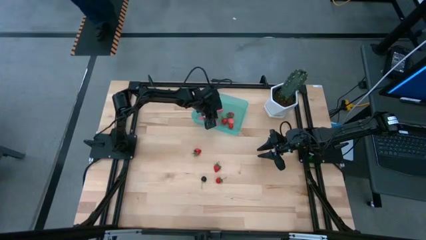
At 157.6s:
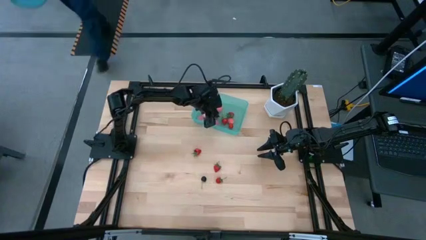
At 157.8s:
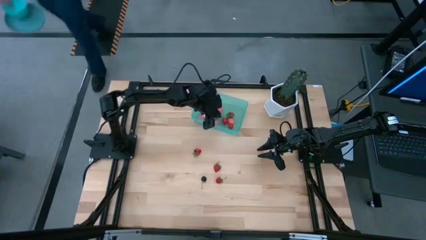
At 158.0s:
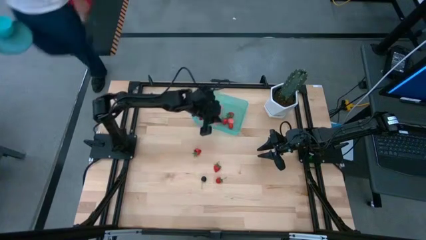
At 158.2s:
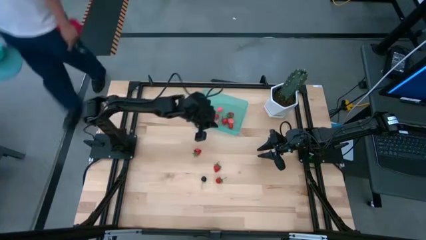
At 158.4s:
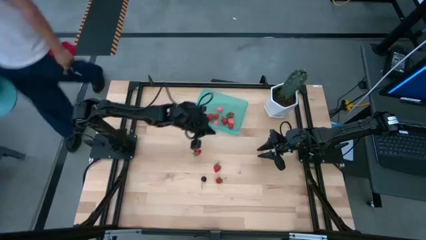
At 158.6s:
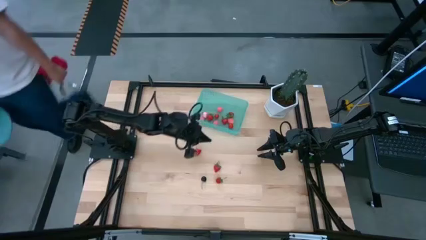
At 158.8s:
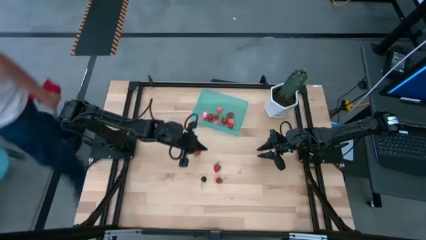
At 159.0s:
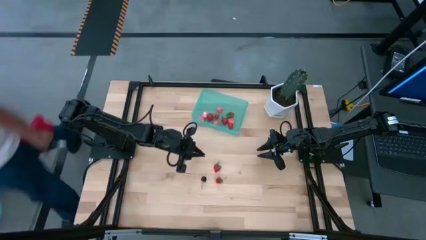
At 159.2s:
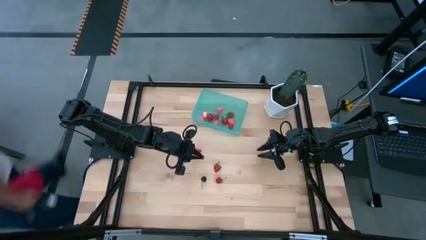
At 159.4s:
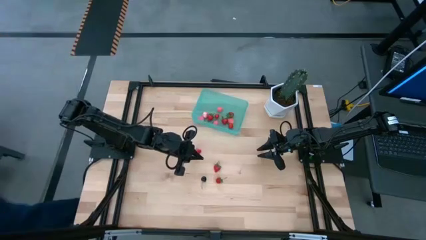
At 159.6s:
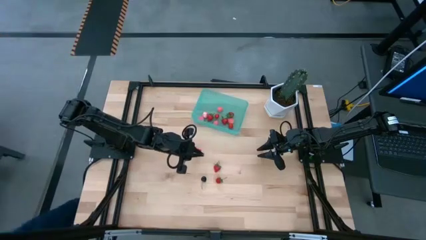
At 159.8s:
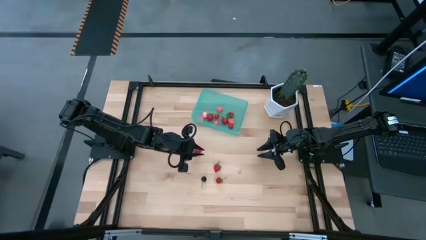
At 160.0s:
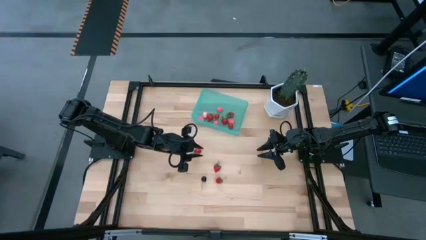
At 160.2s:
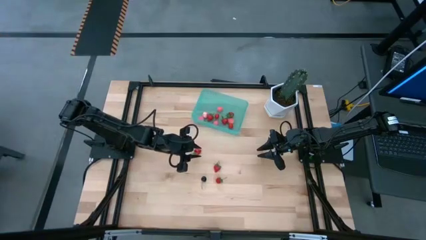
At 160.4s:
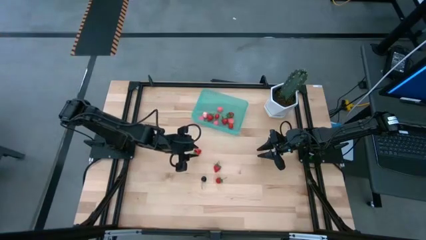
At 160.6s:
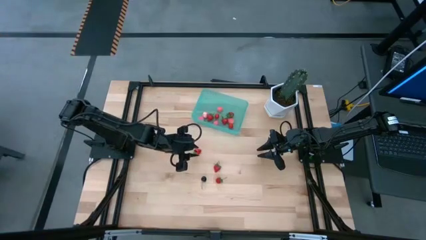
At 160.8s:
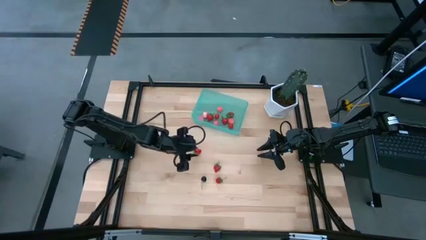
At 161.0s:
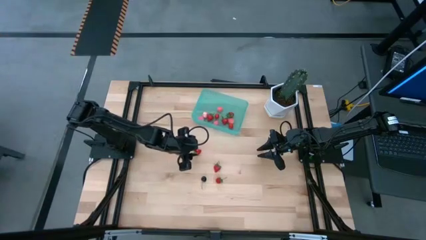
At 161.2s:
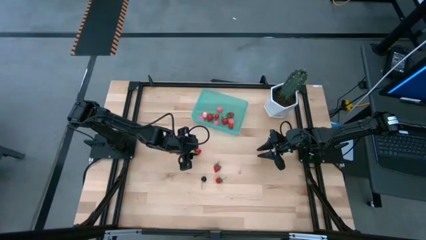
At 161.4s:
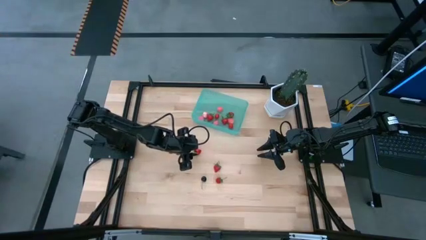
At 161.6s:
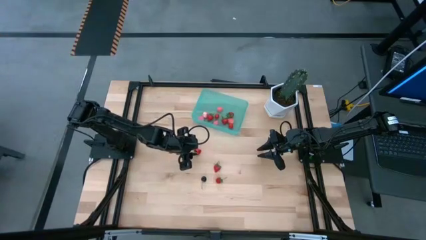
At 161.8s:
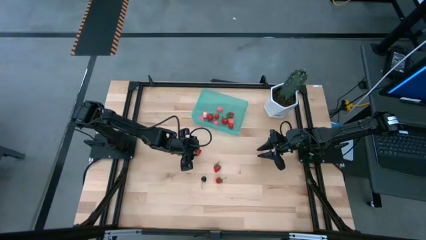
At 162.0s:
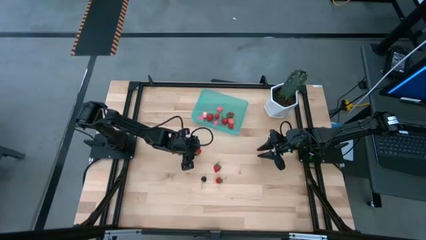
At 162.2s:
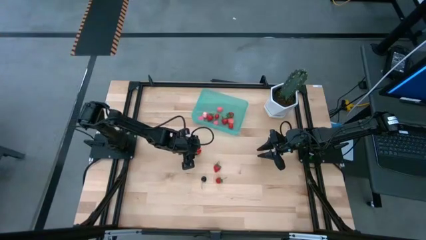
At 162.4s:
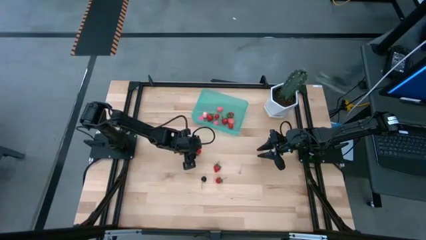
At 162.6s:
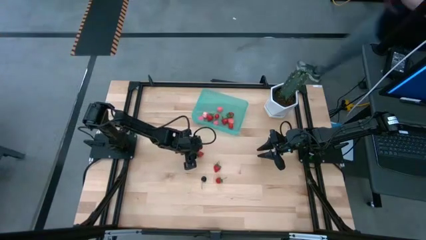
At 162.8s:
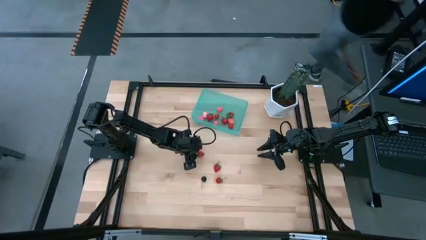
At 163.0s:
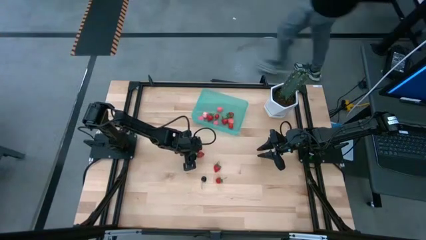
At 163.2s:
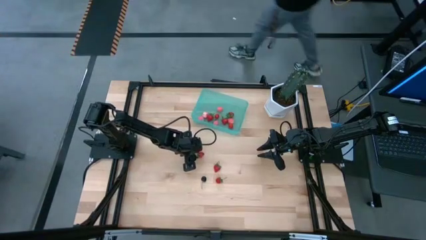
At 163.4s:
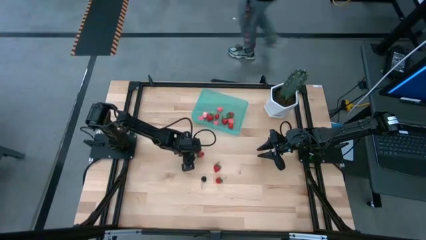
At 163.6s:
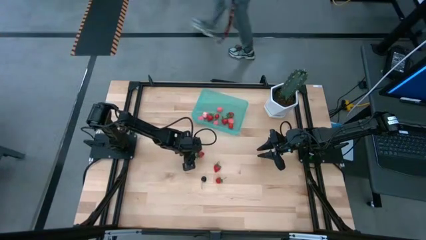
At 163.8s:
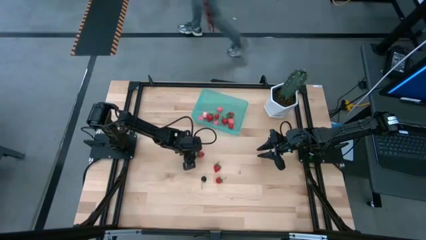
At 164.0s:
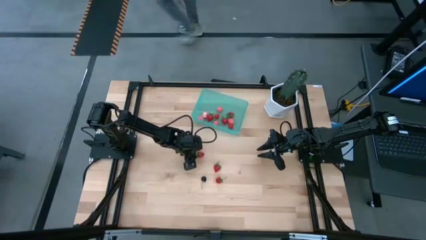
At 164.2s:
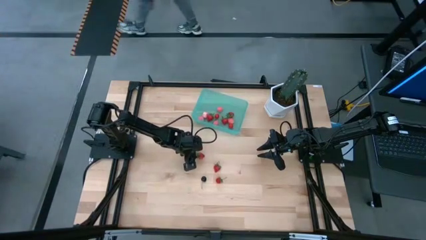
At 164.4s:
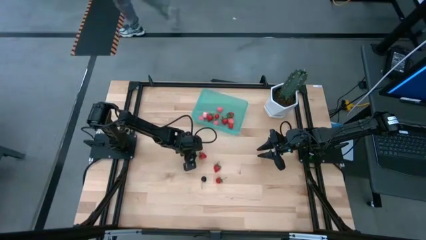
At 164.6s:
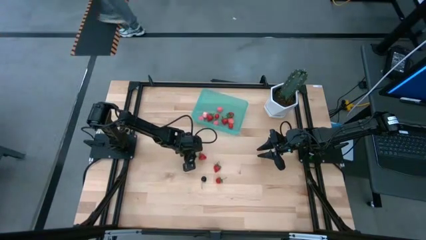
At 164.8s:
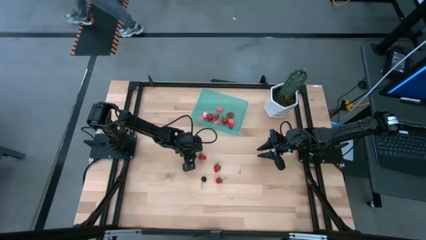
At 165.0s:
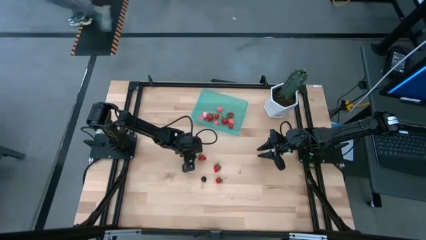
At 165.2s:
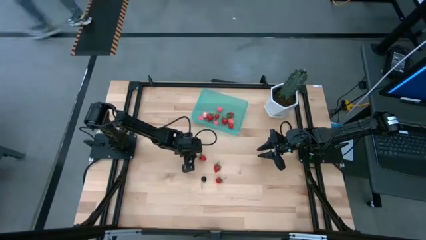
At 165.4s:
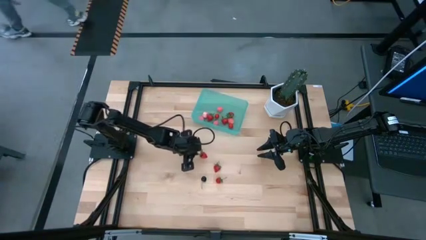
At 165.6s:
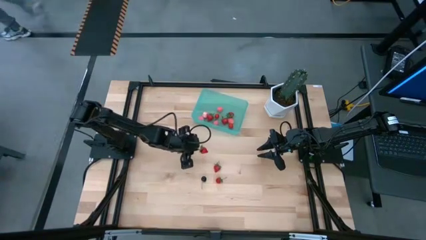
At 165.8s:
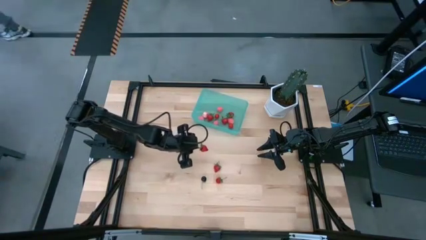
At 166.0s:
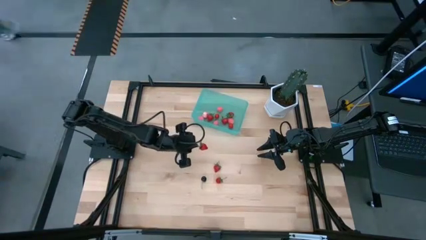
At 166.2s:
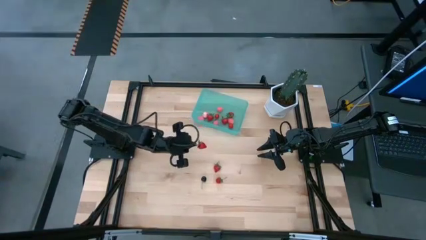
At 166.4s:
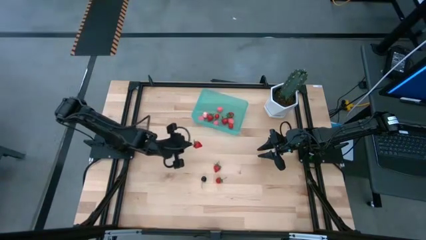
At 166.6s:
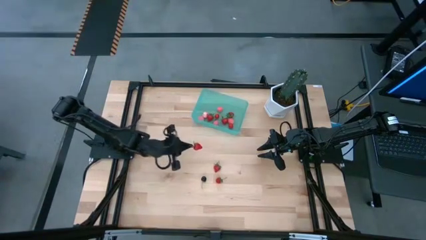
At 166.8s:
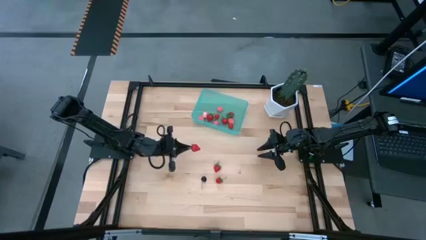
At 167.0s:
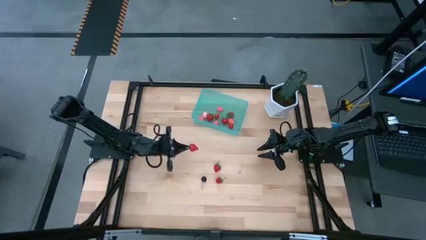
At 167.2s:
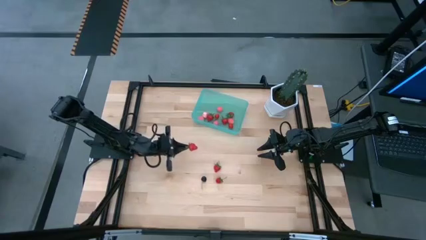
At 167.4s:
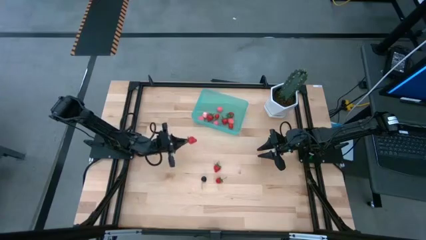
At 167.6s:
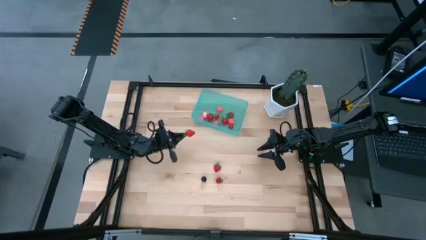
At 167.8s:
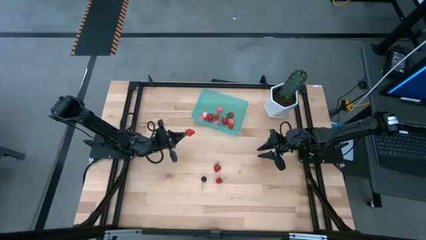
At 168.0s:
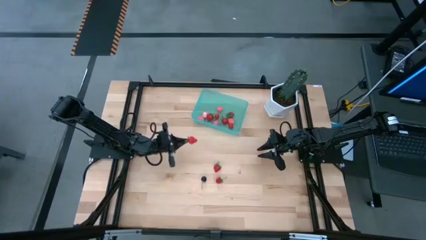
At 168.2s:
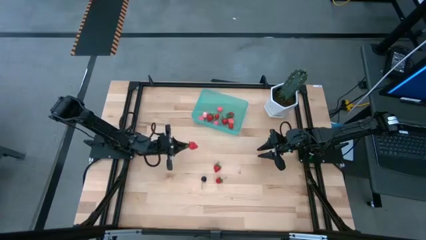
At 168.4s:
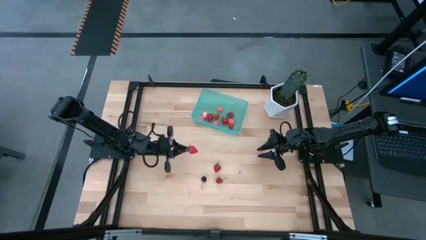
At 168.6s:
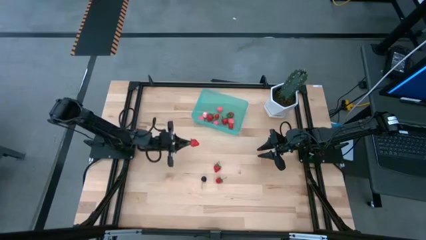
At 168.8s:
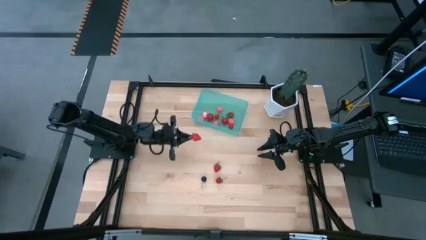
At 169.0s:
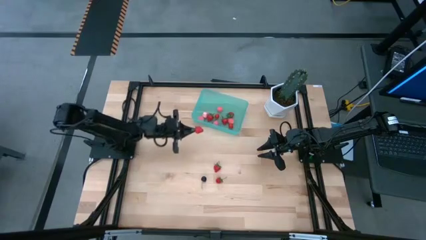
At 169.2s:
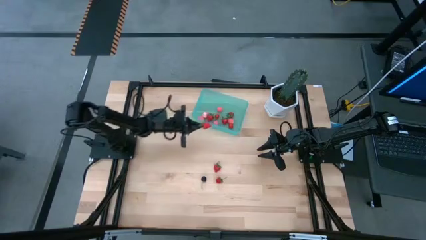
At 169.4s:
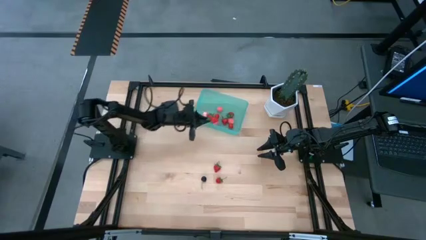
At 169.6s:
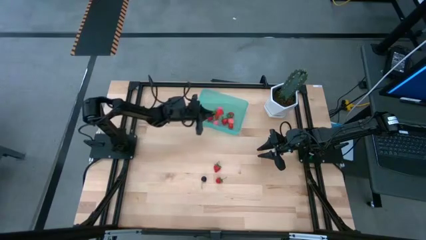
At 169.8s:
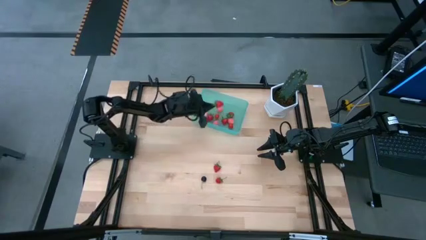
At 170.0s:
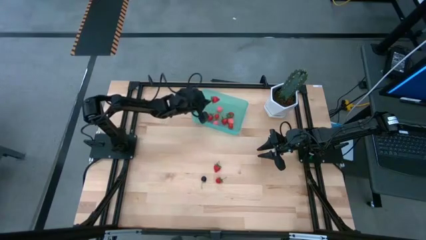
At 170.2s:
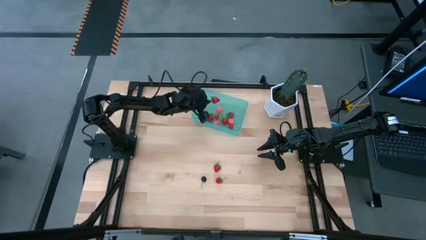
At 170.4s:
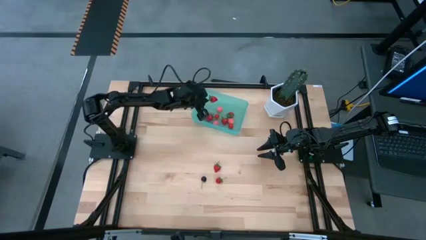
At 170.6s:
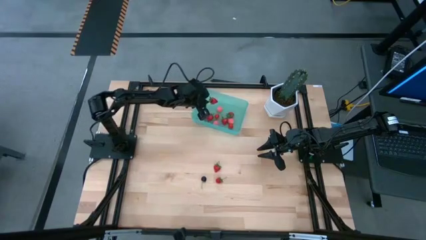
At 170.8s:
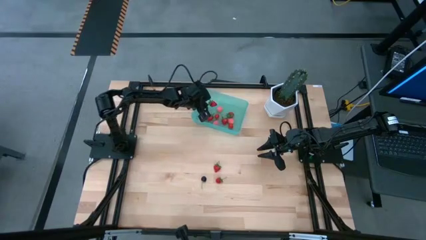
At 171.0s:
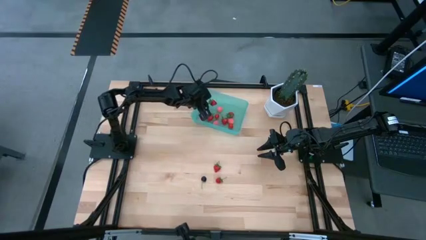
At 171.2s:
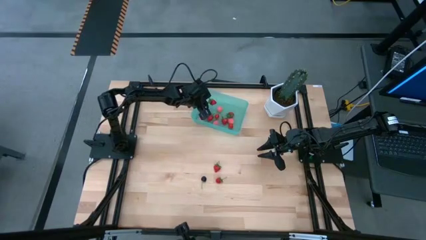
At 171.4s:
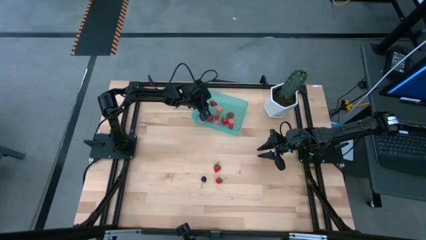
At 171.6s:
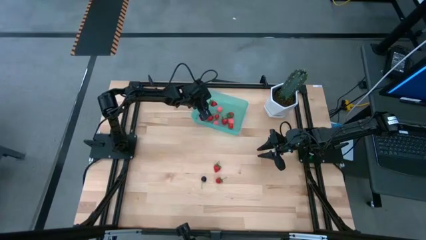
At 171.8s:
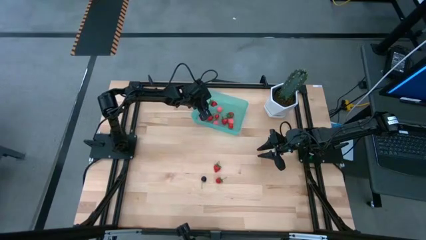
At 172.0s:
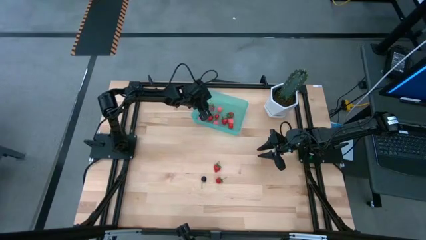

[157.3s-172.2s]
Task: Pick and placing Produce into tupperware
Put the red strawberry into the light blue bin

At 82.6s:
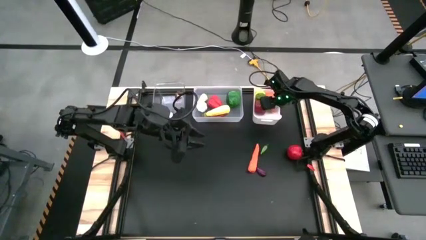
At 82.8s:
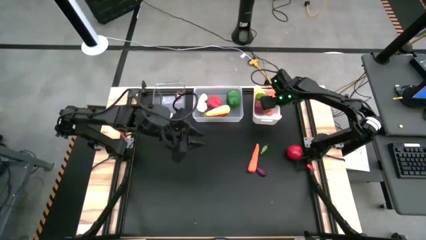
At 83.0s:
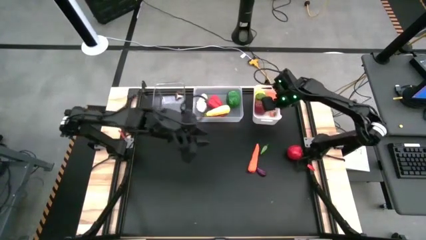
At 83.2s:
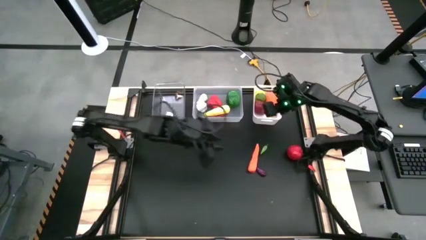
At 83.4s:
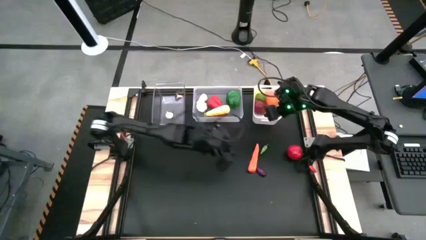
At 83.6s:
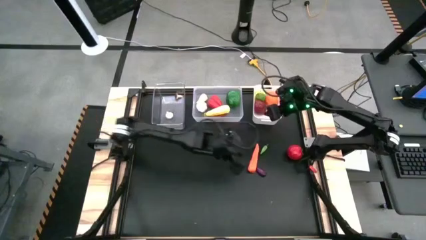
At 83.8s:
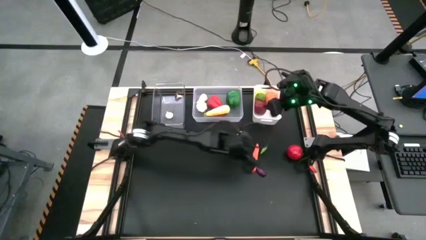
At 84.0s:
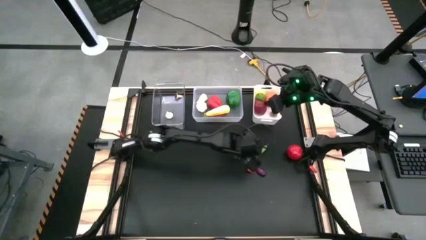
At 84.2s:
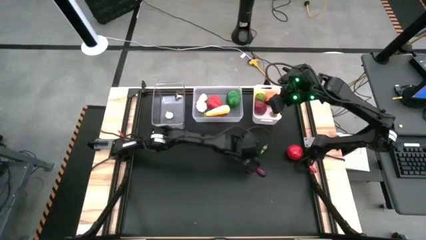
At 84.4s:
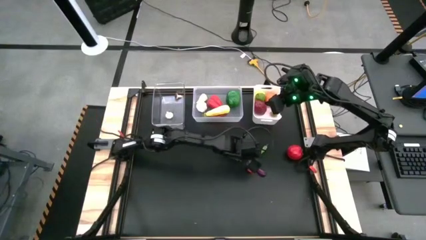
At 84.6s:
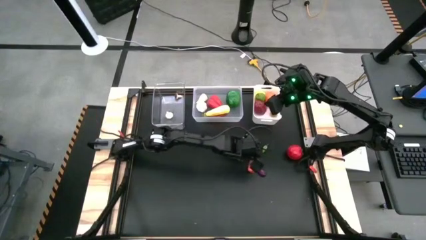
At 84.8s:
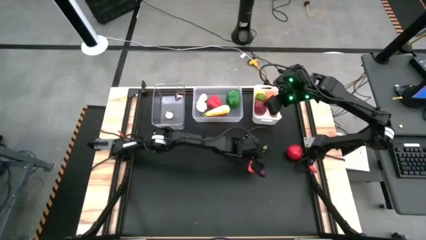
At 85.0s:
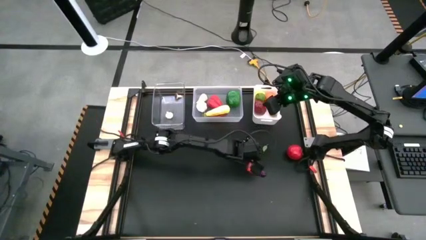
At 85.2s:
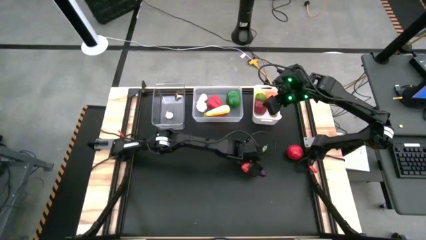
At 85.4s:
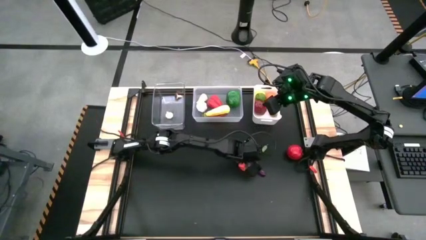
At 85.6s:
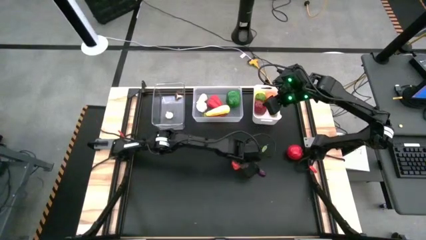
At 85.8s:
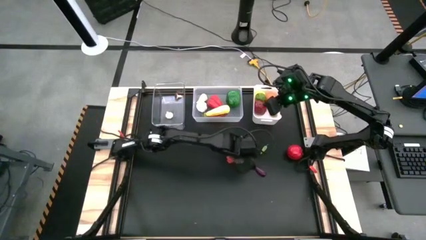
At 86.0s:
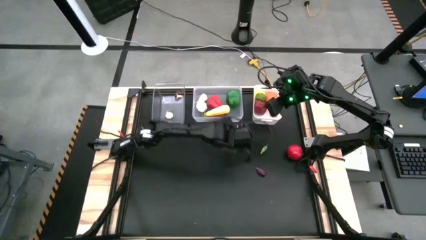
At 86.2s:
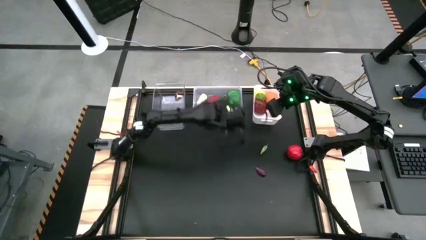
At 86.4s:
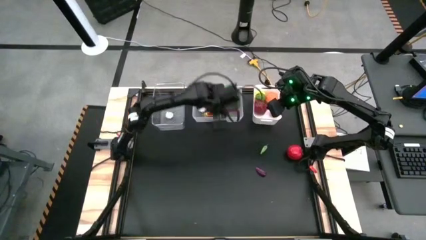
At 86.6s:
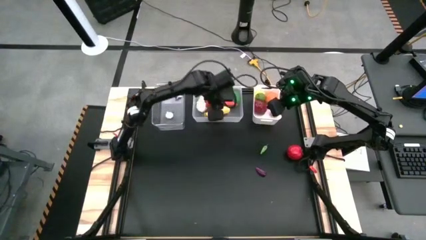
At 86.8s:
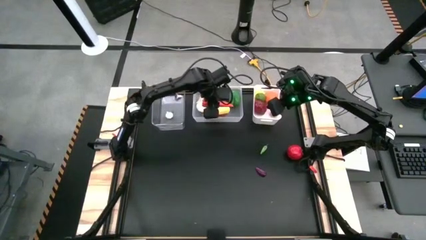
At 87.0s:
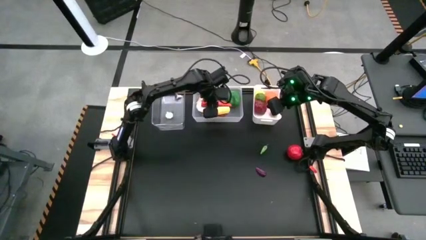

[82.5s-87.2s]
Task: Sort produce into baskets
Put the orange carrot into the transparent bin
